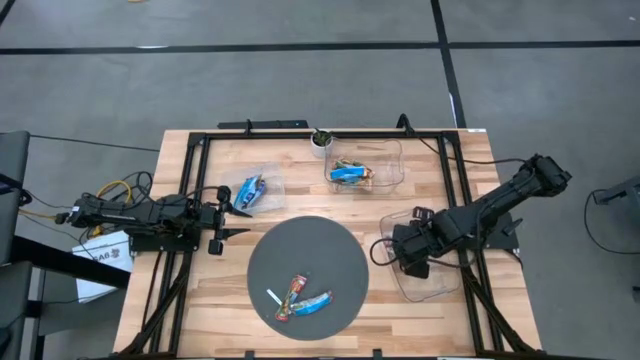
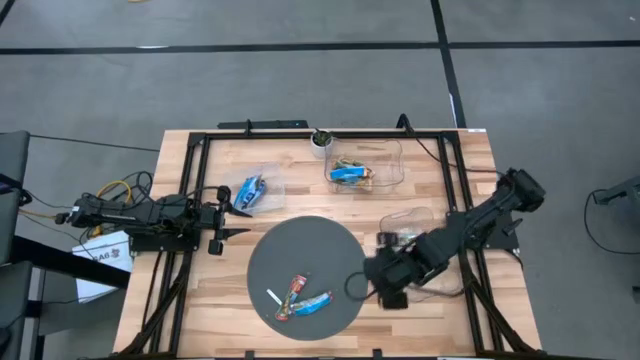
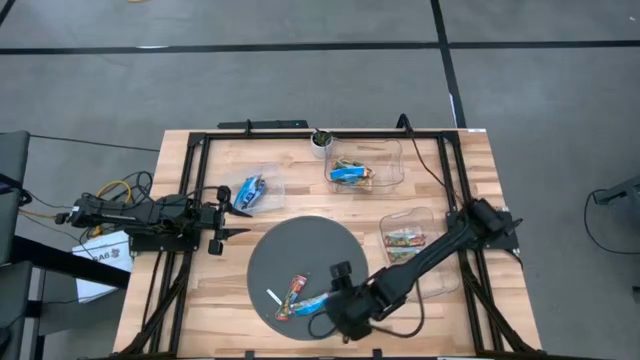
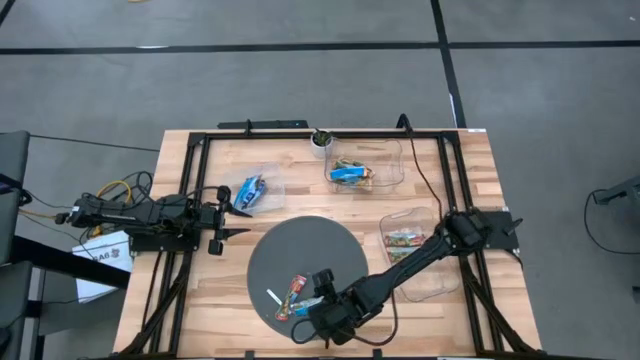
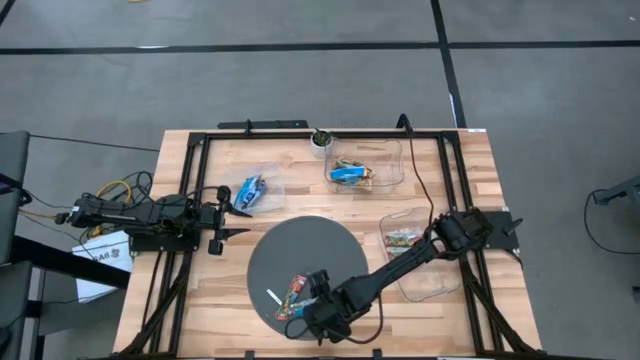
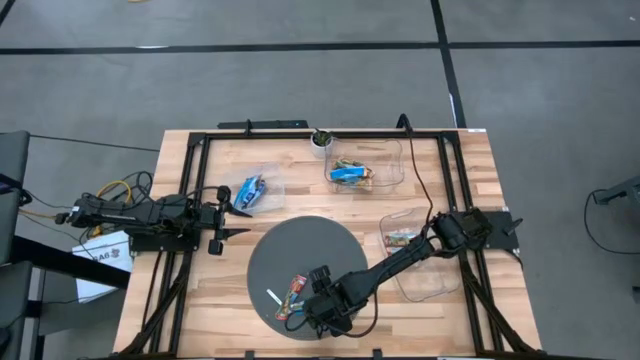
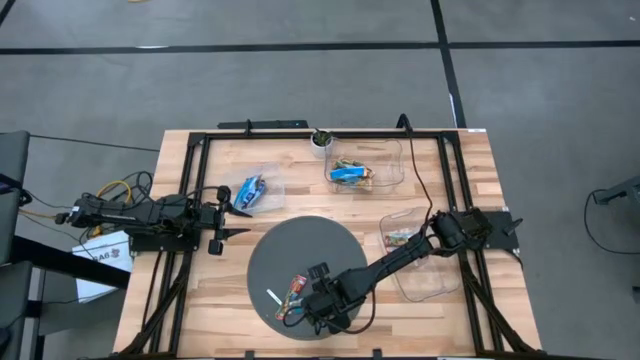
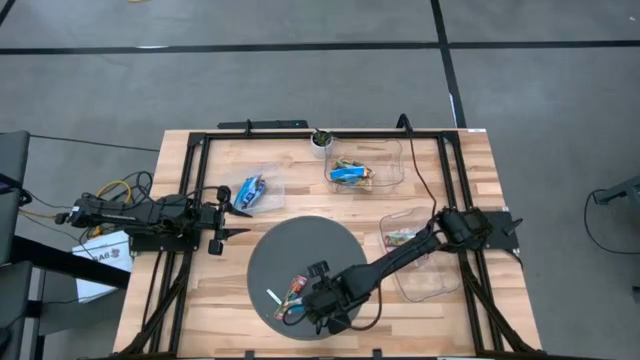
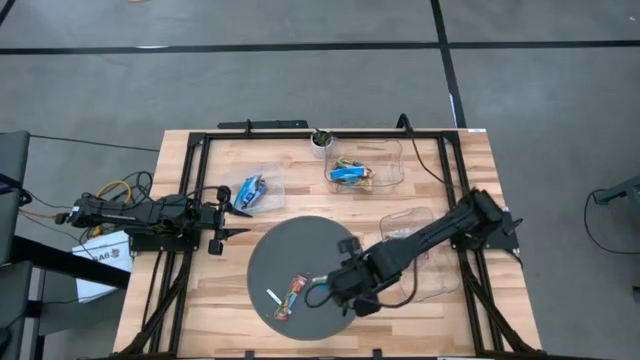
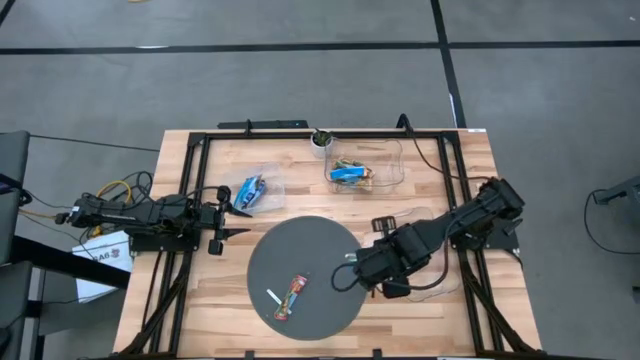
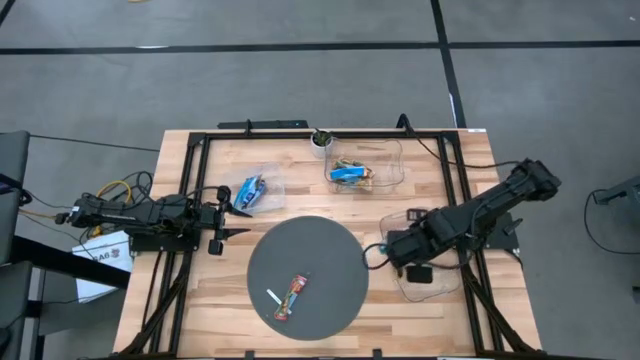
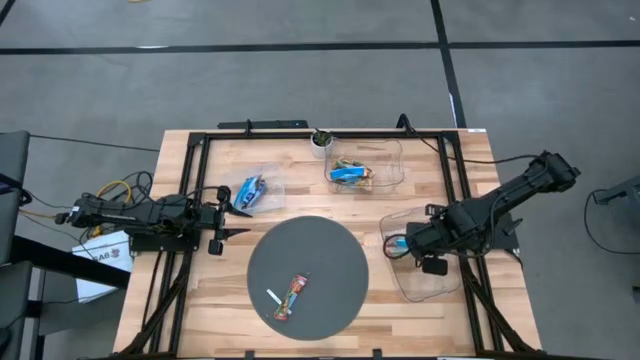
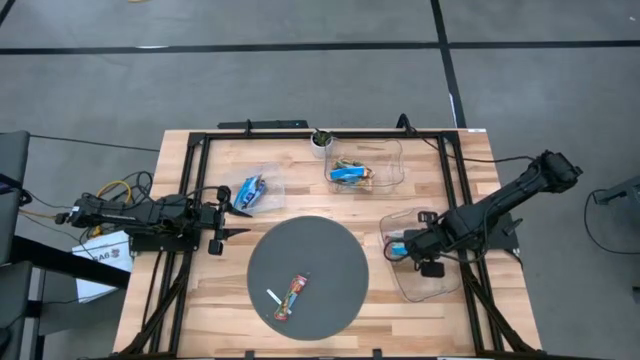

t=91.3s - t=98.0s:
Task: Pick and place Granola Bars by type
Put the red granola bar into the bottom transparent bin

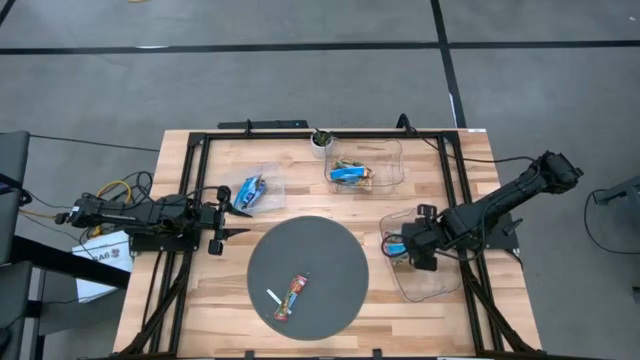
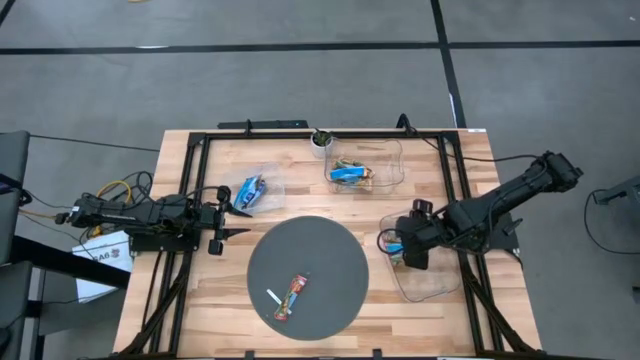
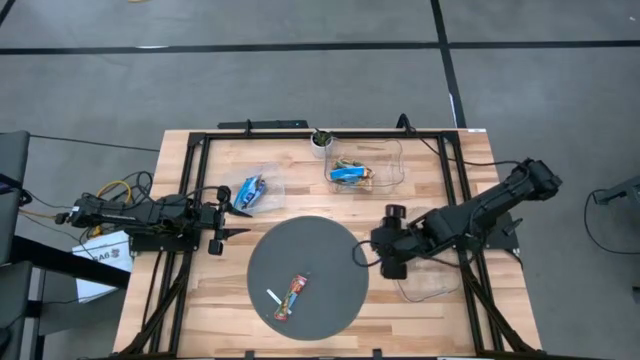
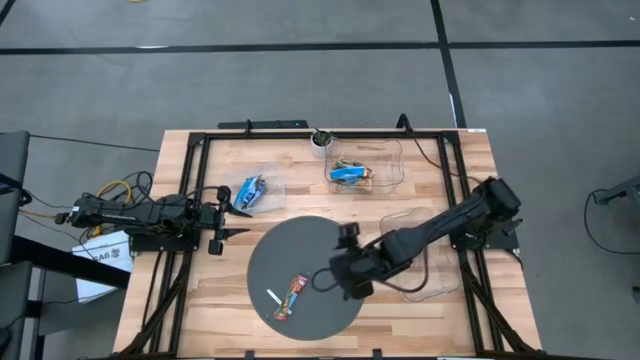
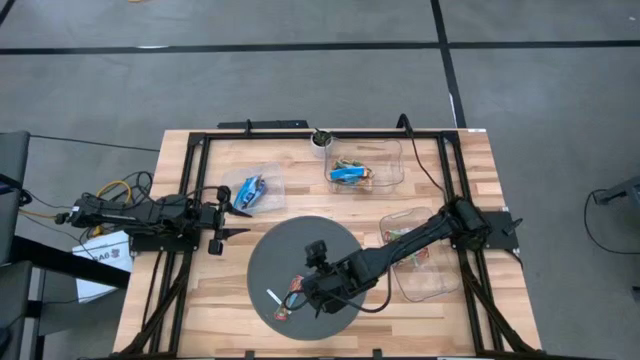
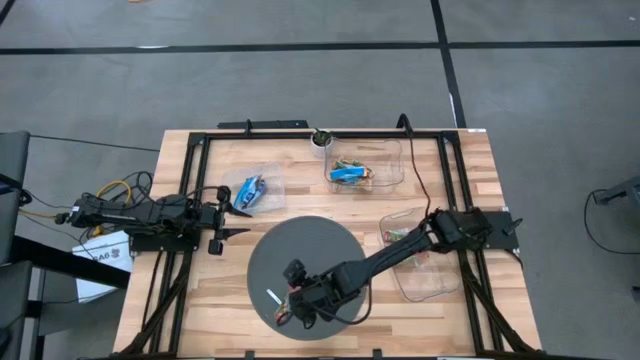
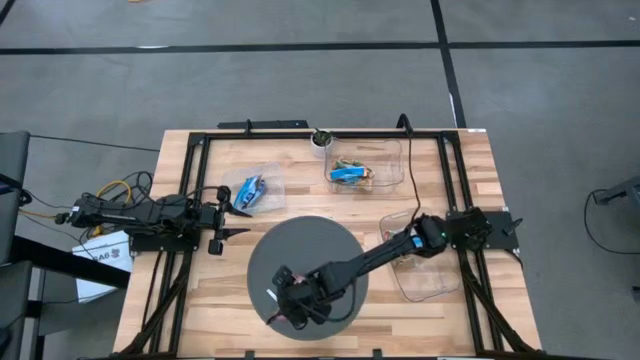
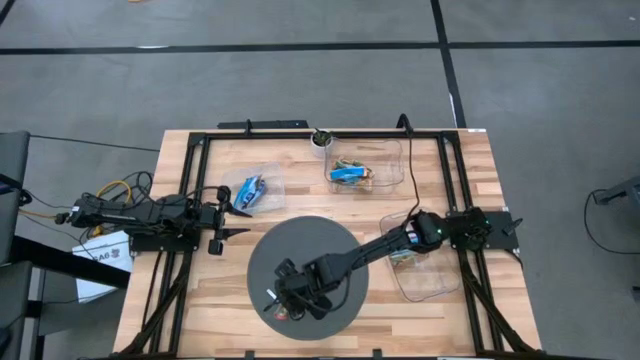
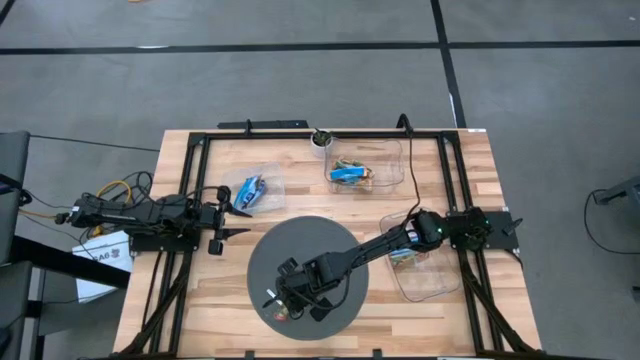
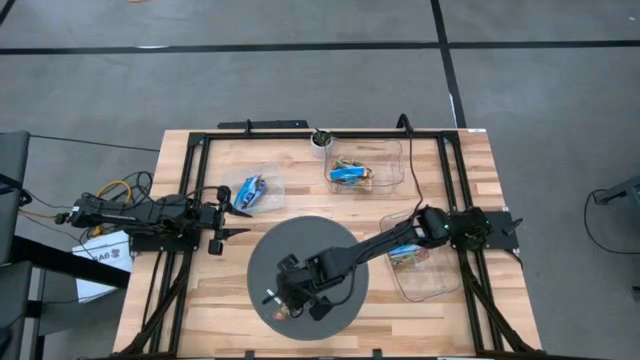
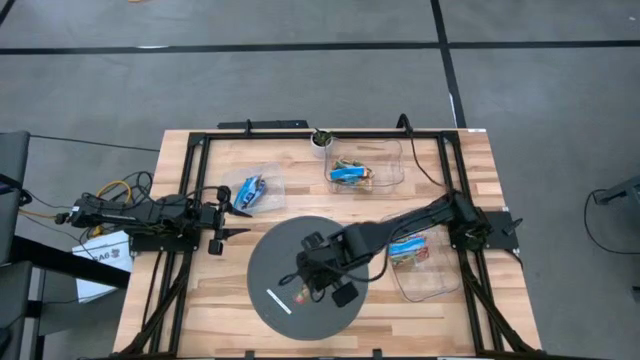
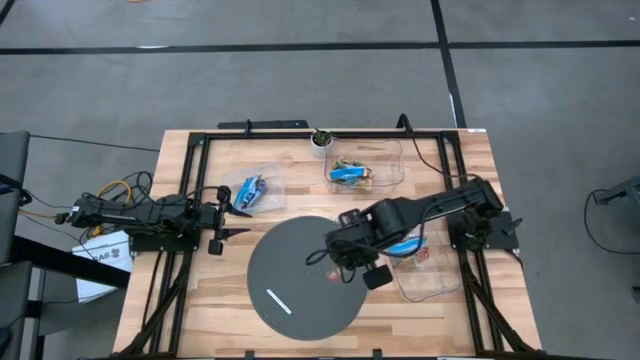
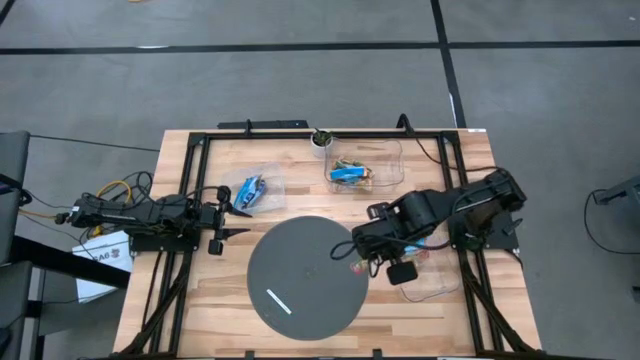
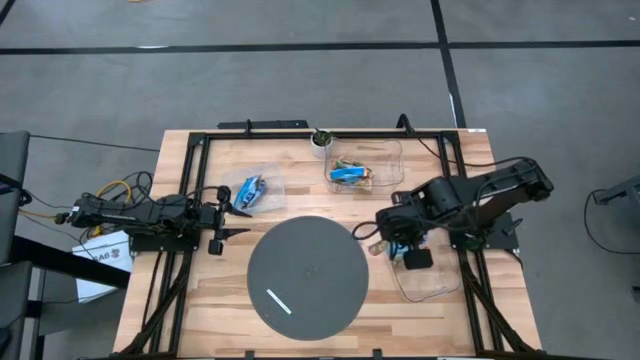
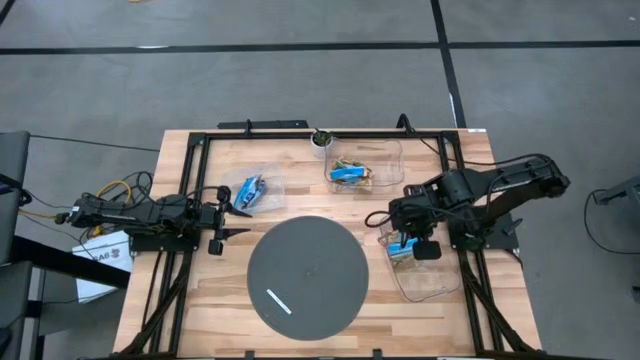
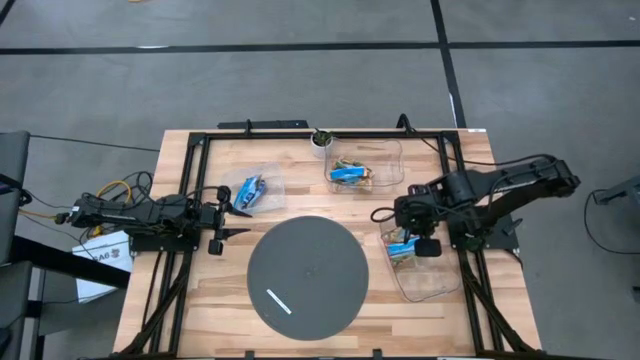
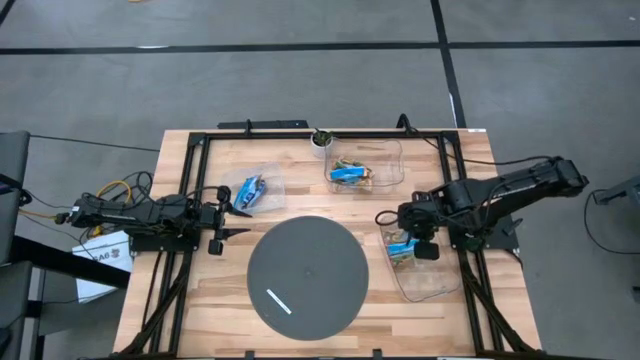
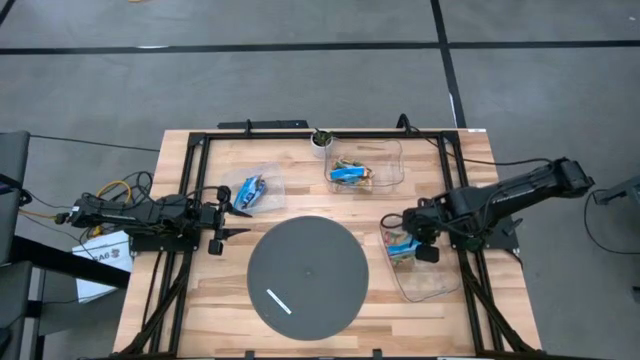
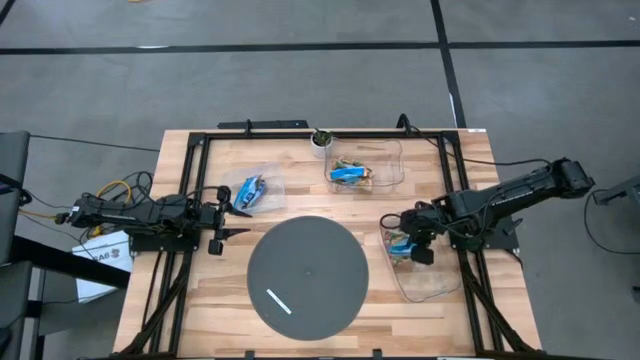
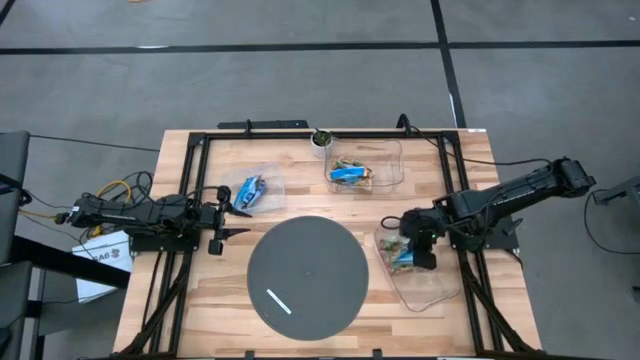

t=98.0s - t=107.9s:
Put the red granola bar into the bottom transparent bin

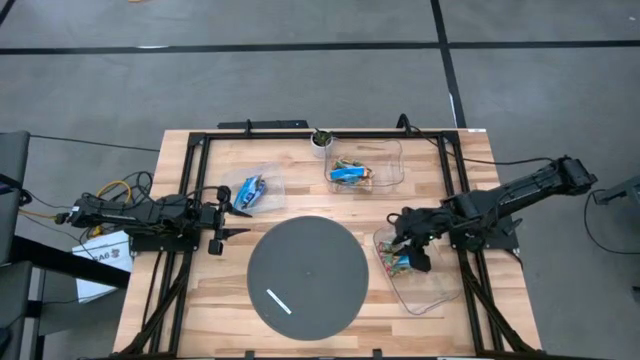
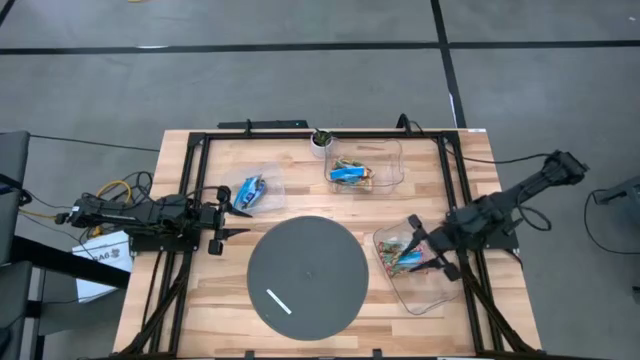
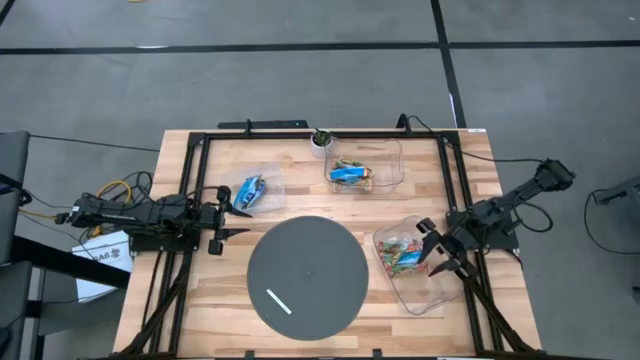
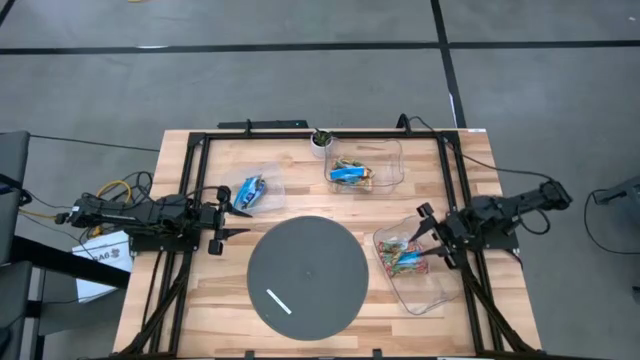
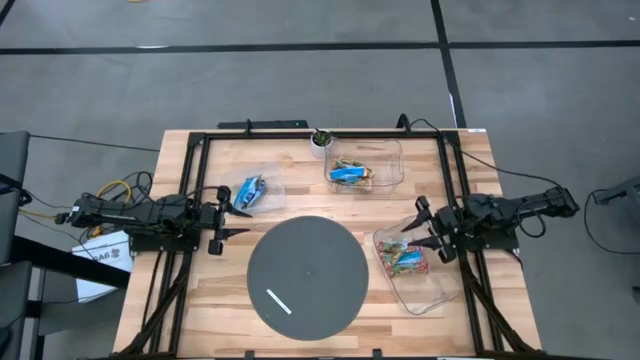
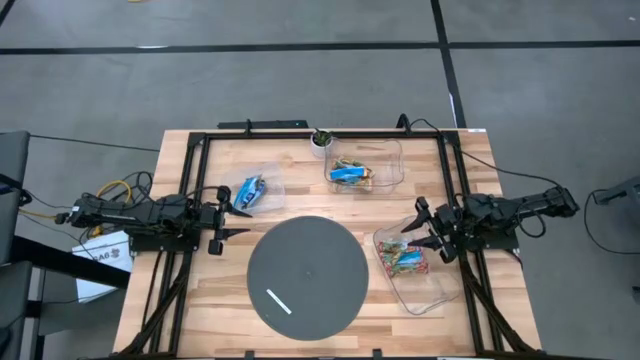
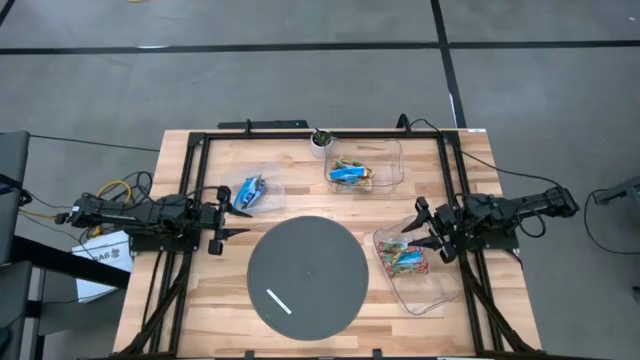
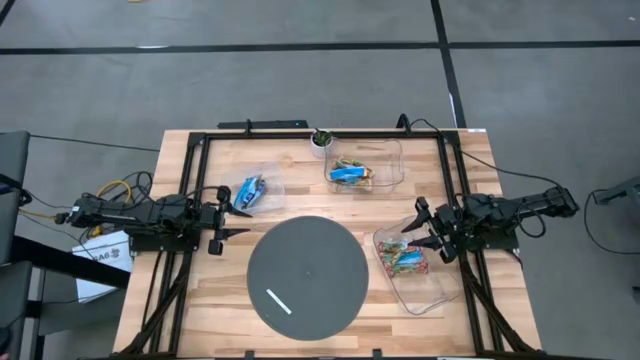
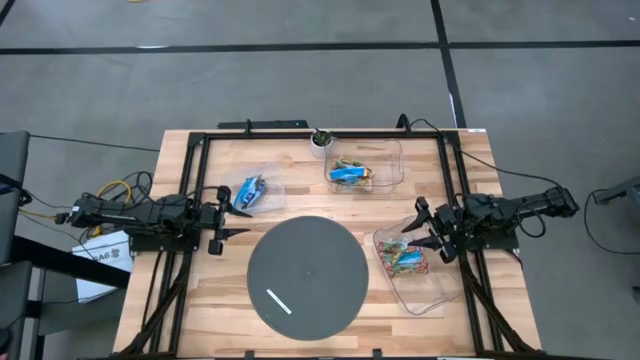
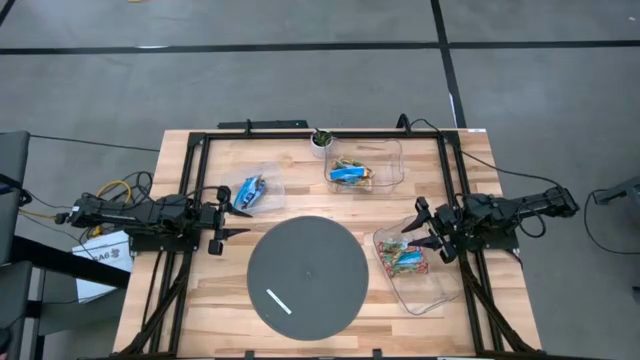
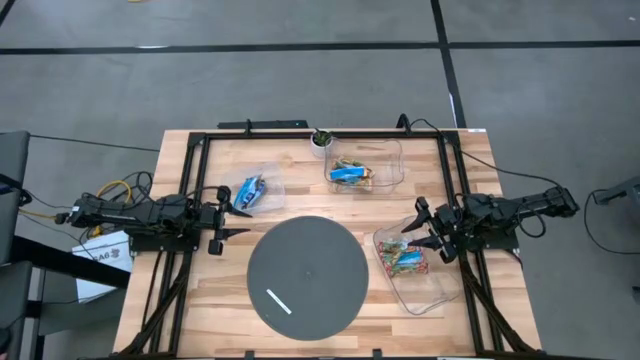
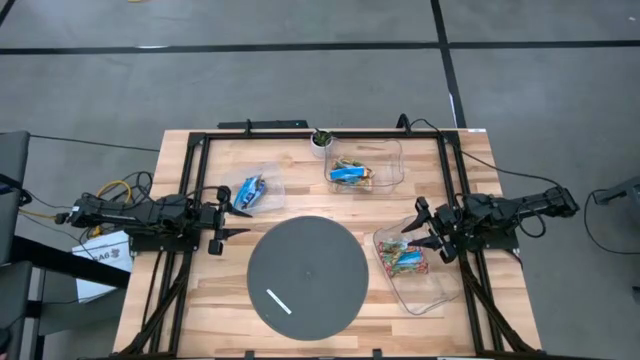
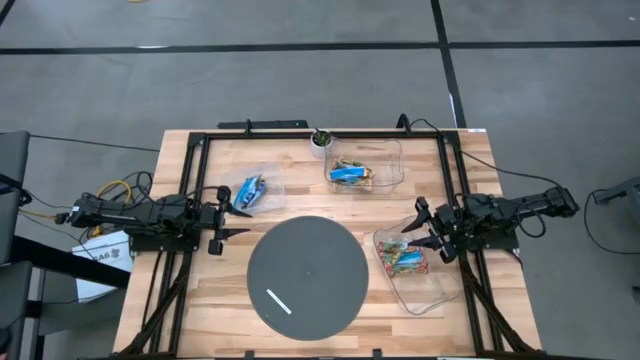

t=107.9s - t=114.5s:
Return to Home Position
